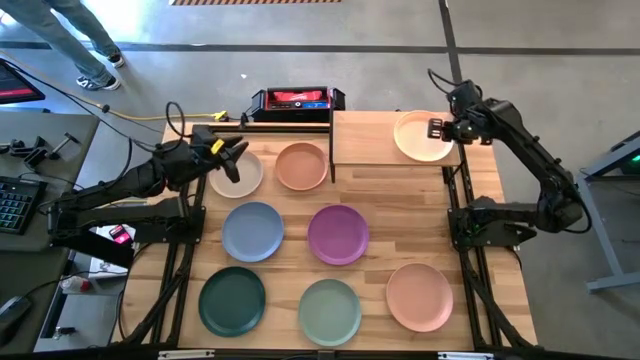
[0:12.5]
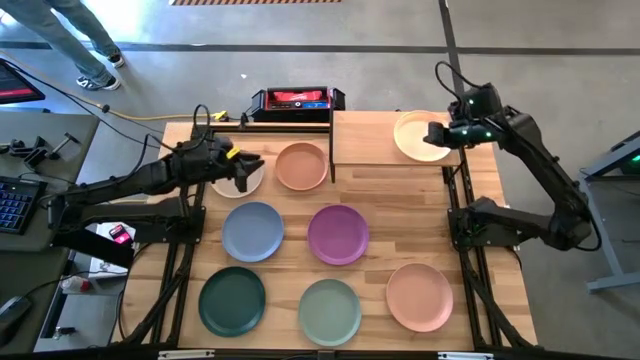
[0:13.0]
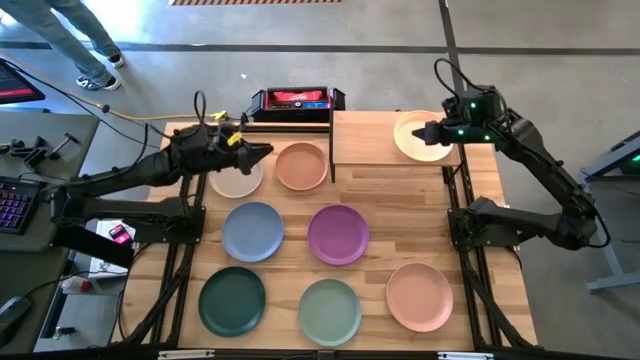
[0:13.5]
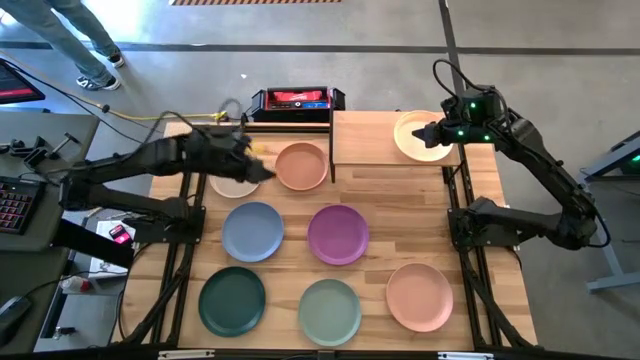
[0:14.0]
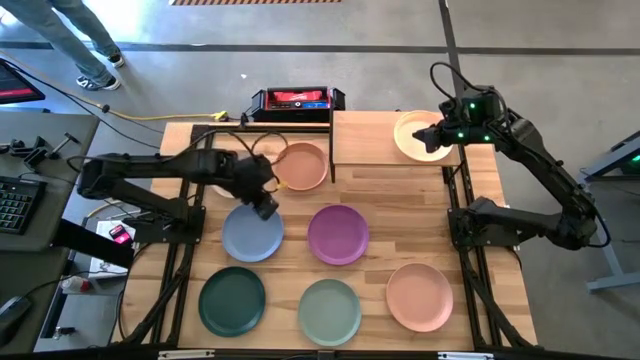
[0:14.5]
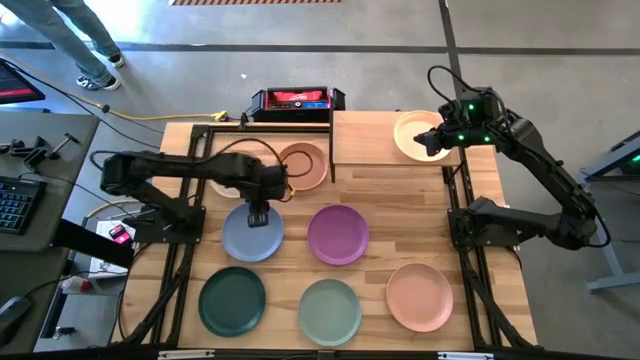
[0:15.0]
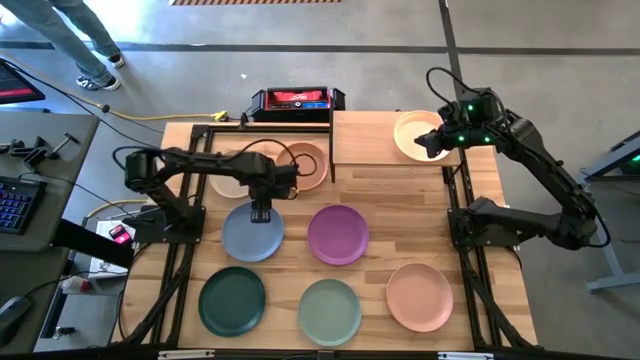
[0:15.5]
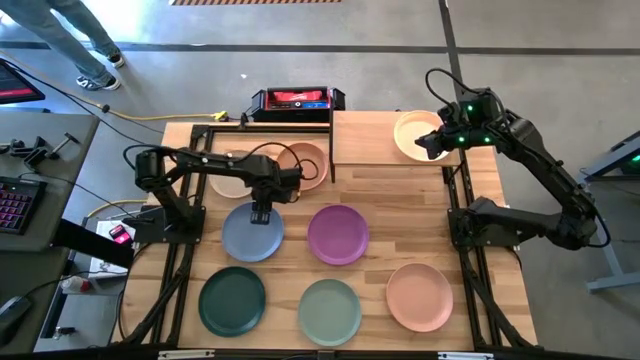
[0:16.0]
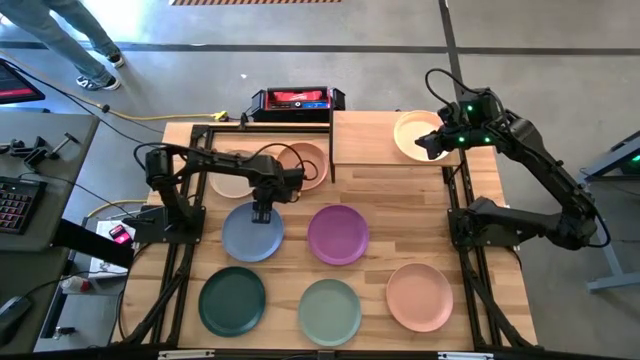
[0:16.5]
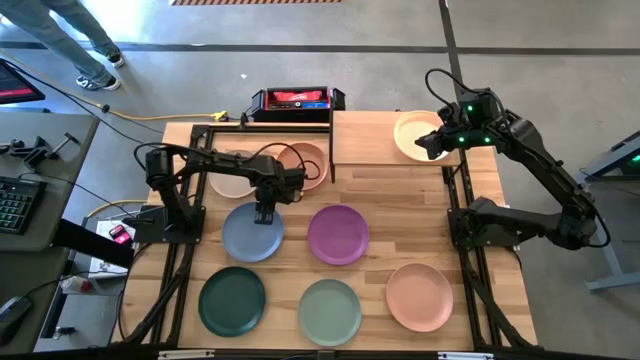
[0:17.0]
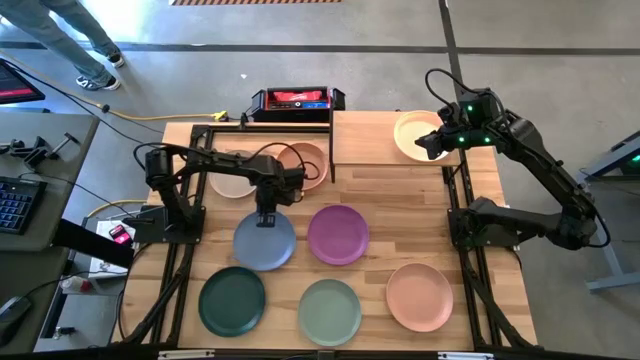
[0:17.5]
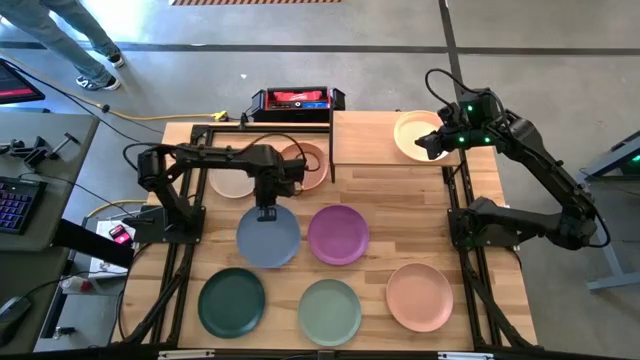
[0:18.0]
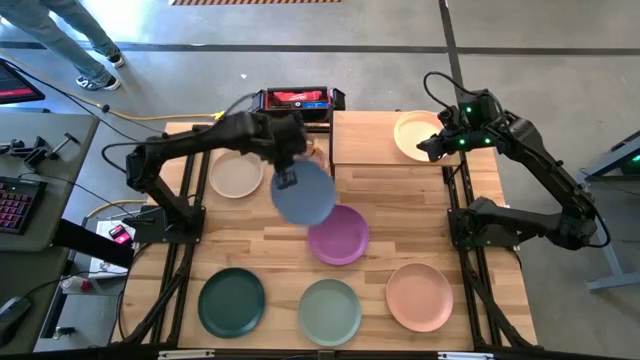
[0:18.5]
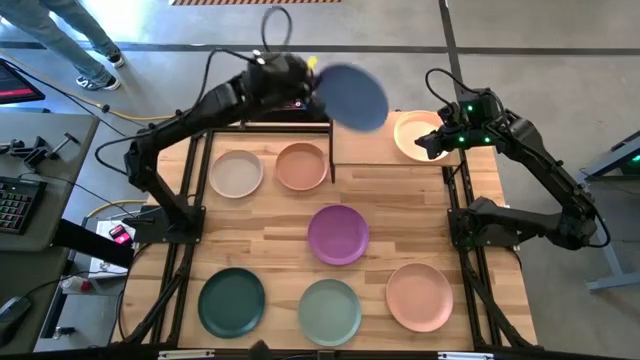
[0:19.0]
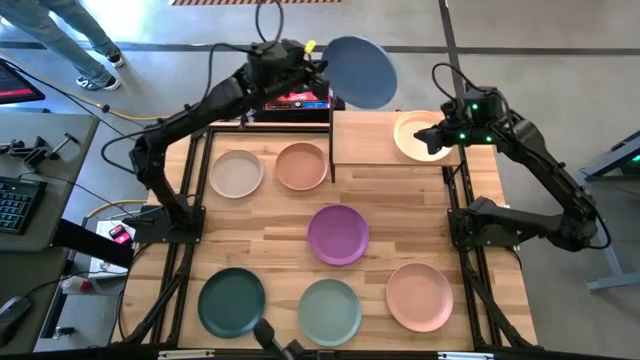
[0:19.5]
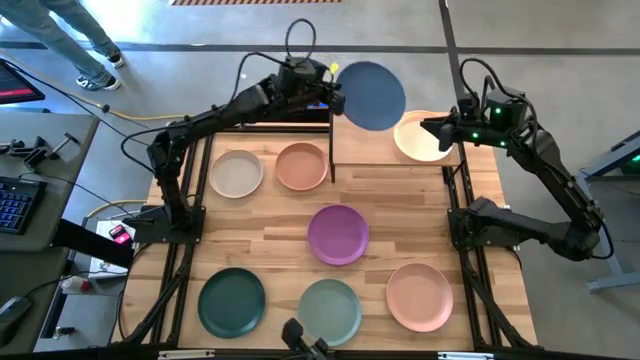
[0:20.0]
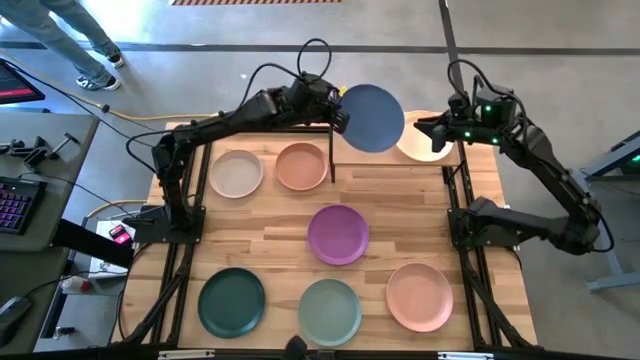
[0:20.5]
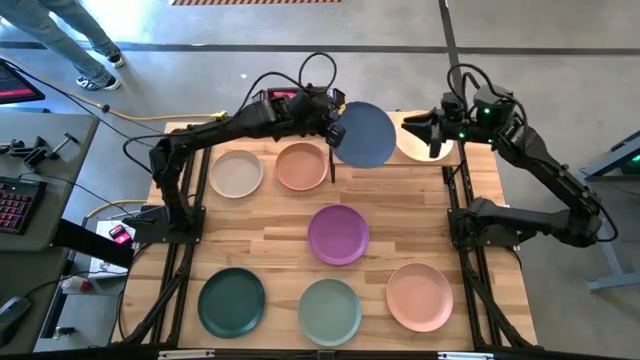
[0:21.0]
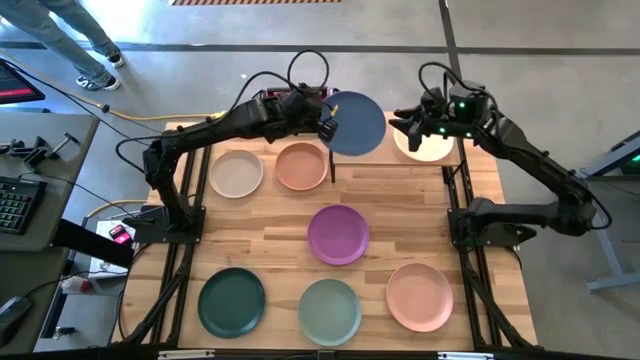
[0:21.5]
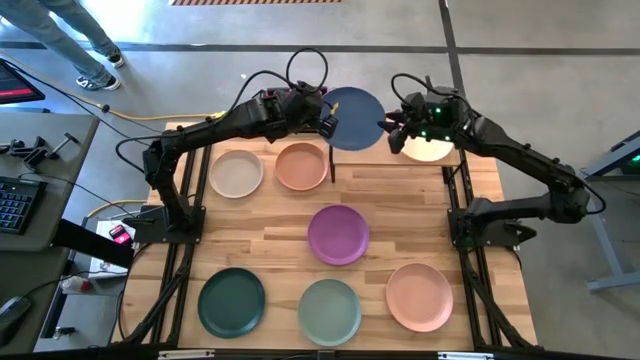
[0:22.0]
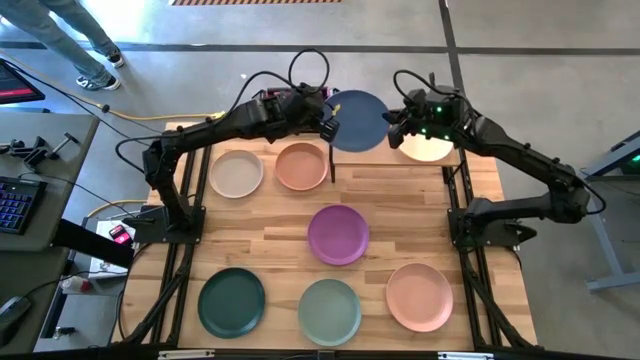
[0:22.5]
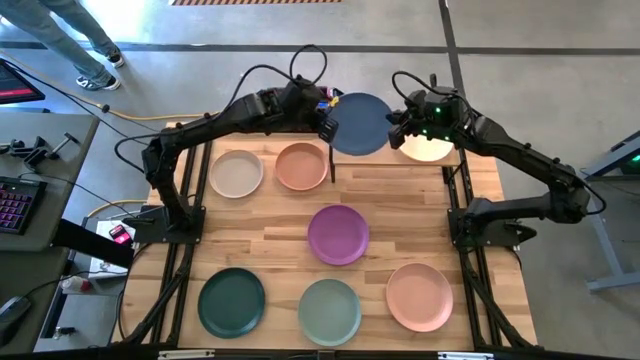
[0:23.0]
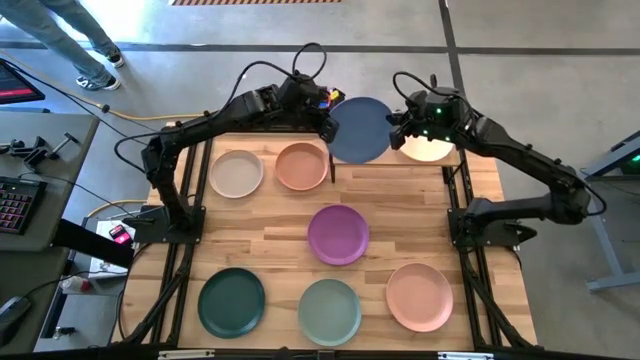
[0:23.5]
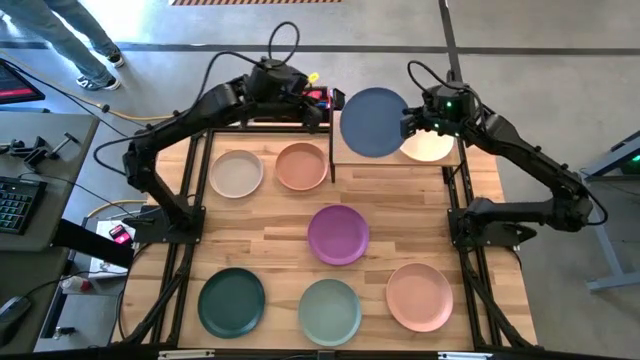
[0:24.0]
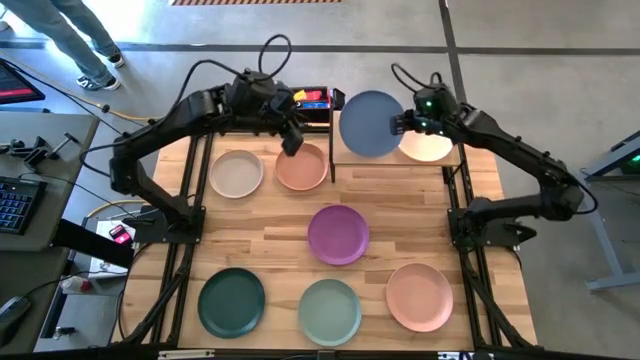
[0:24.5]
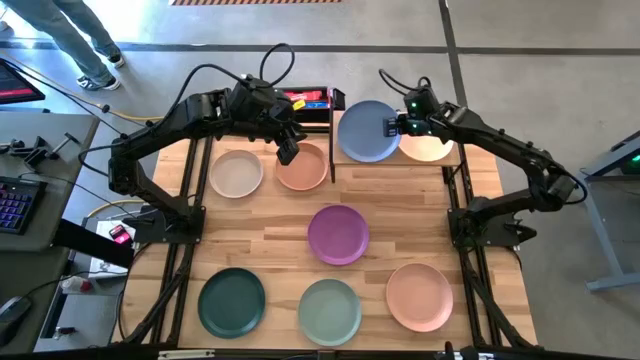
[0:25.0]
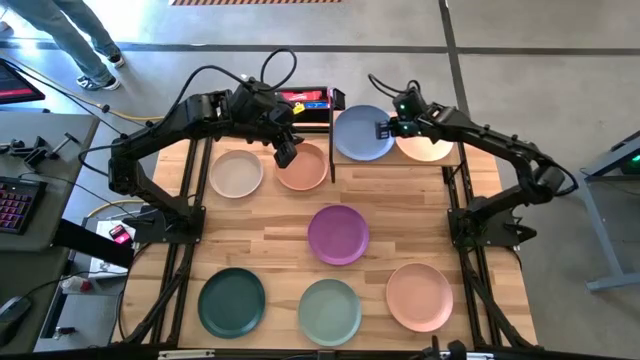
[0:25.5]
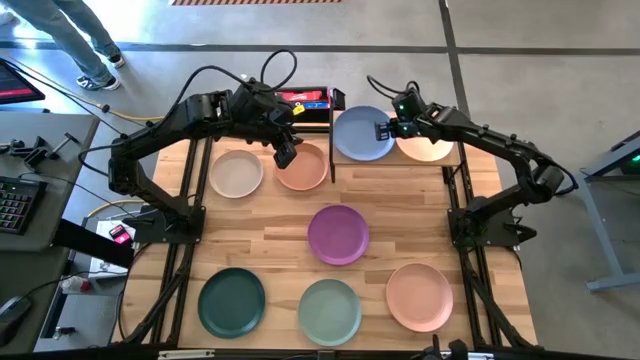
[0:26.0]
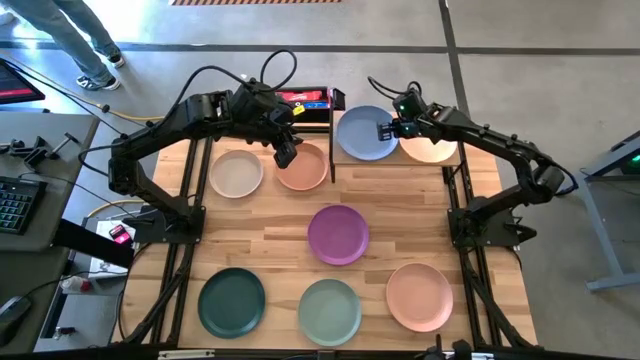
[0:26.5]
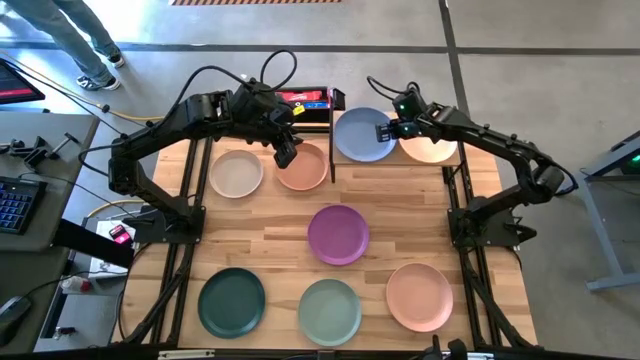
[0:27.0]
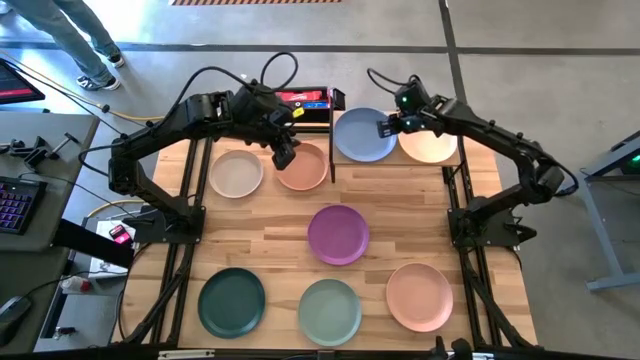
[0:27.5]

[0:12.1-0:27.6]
Task: Place and stack plates onto a shelf
Put the blue plate on the shelf

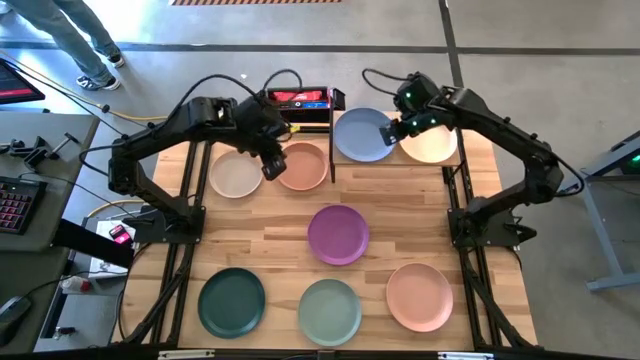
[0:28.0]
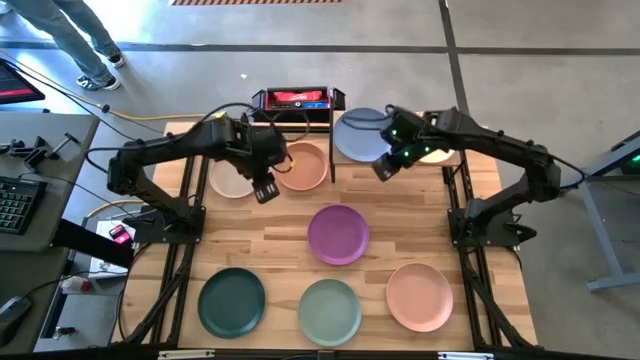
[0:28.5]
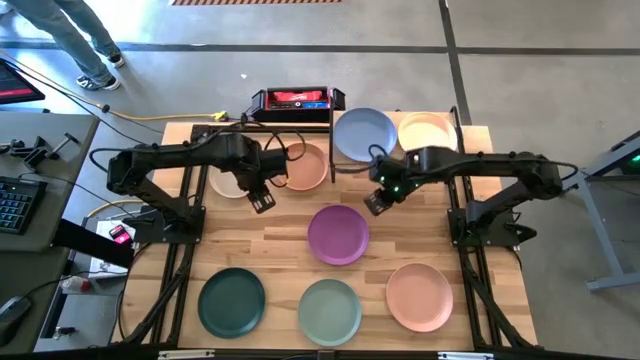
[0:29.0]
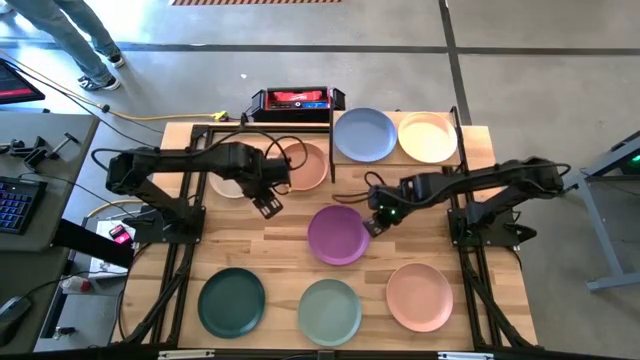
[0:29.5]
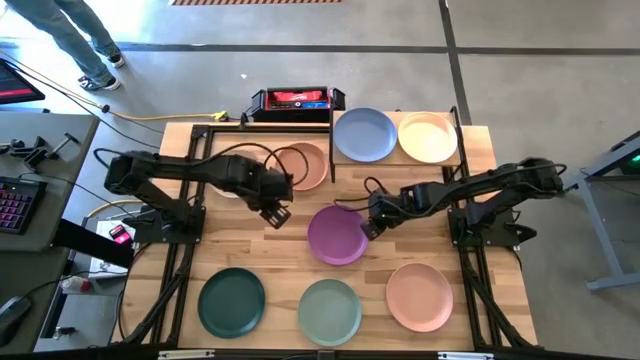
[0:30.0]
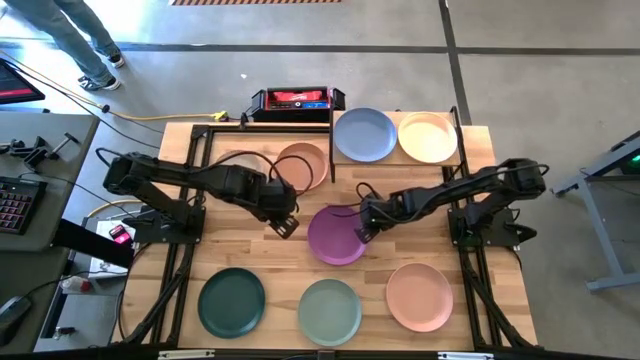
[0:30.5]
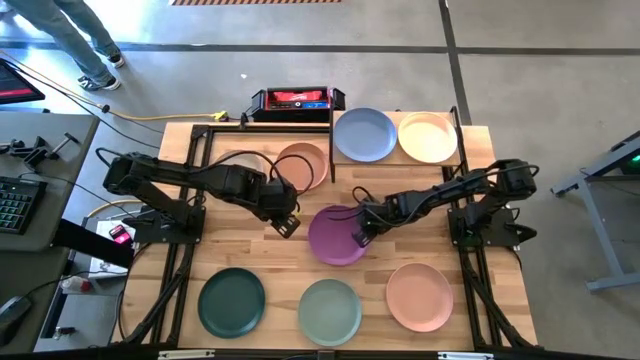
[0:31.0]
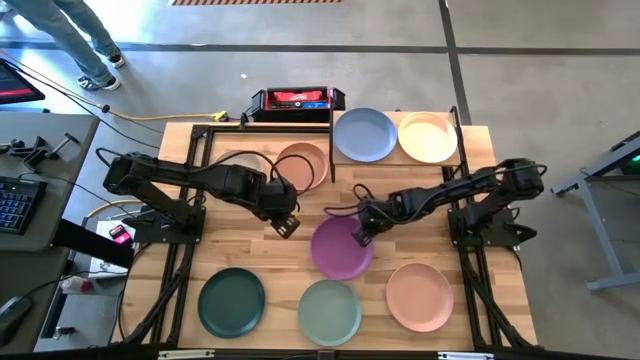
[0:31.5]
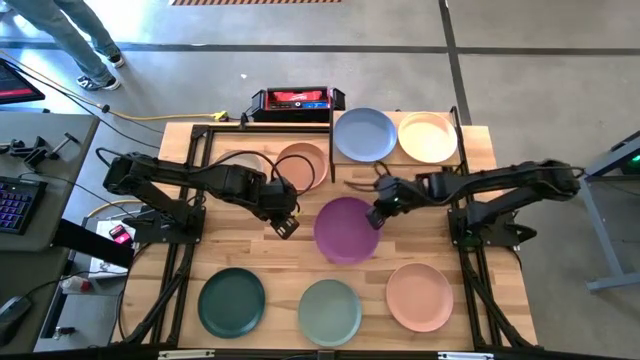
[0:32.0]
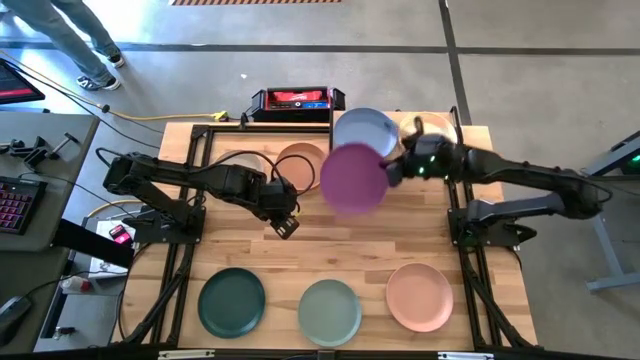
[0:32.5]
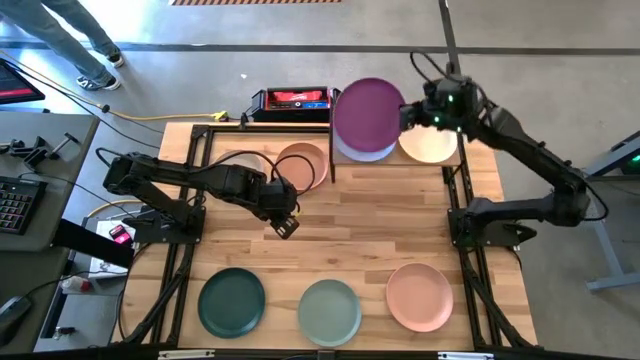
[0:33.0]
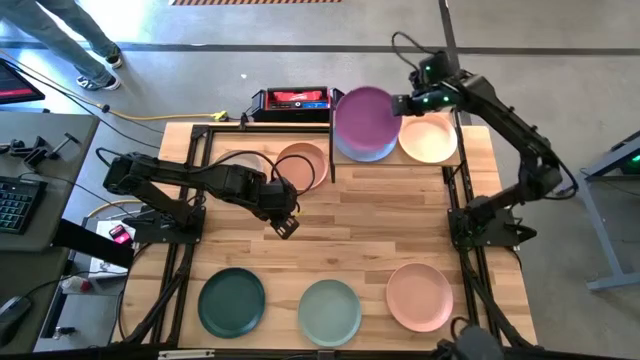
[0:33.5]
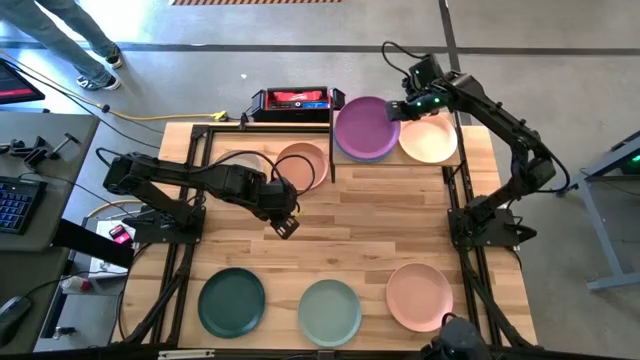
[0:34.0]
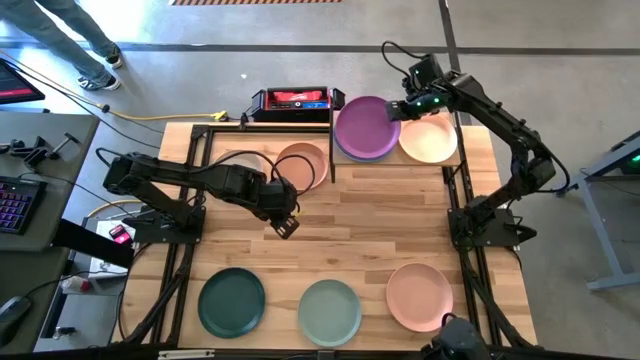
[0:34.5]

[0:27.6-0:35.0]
Stack the purple plate on top of the blue plate on the shelf
